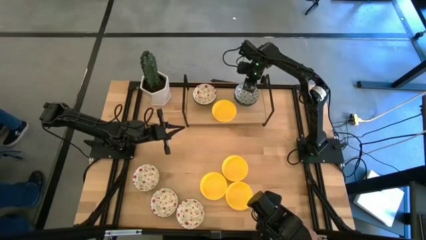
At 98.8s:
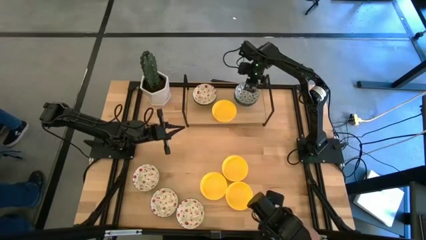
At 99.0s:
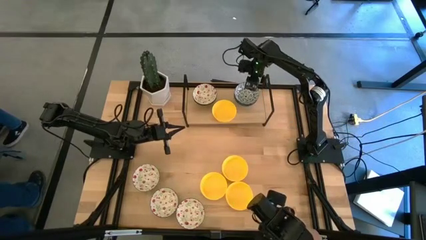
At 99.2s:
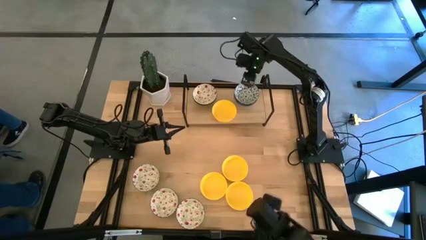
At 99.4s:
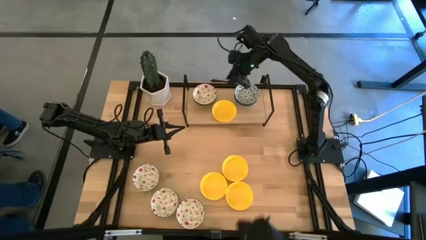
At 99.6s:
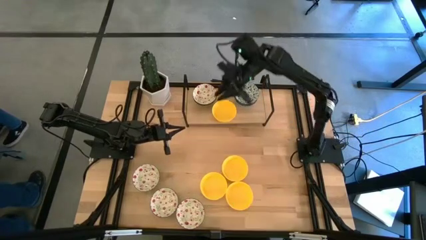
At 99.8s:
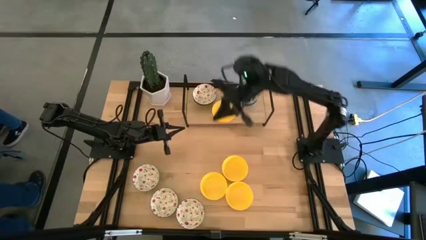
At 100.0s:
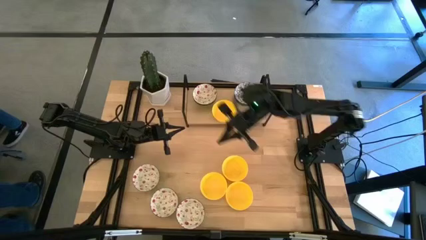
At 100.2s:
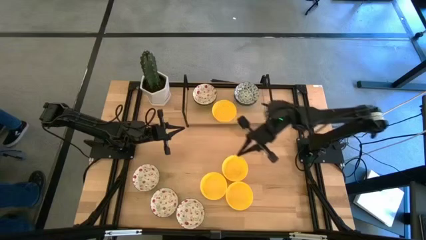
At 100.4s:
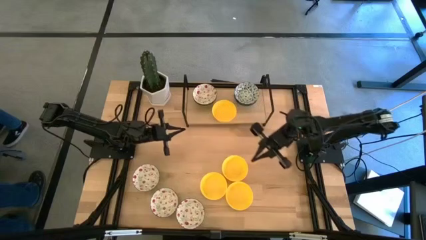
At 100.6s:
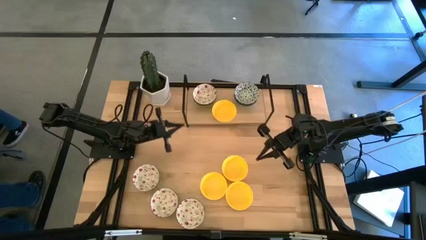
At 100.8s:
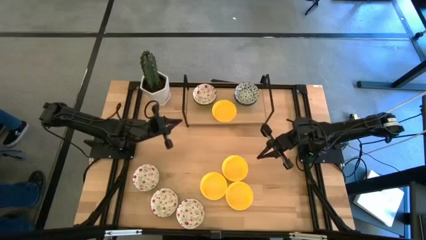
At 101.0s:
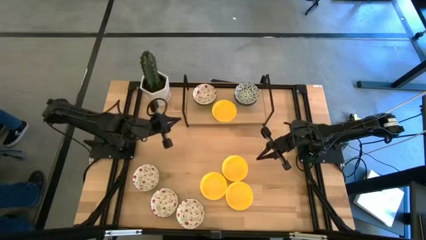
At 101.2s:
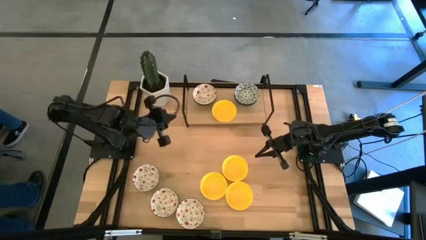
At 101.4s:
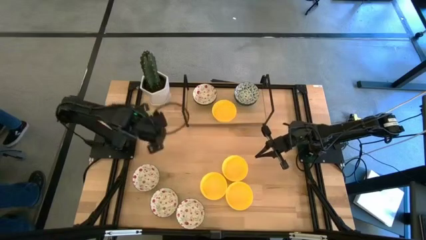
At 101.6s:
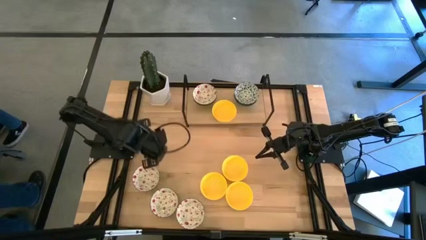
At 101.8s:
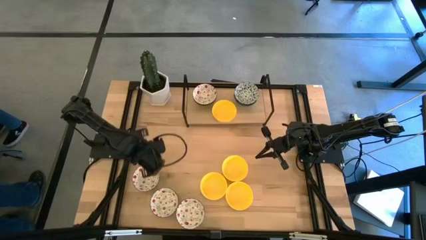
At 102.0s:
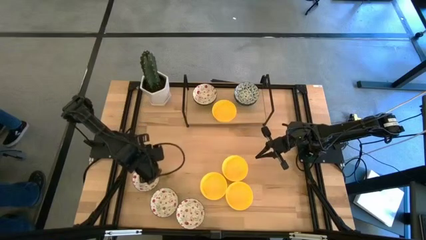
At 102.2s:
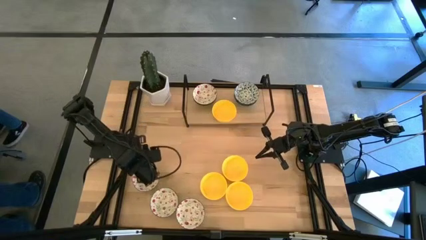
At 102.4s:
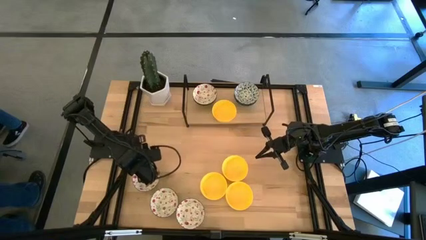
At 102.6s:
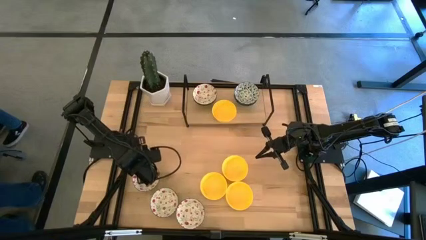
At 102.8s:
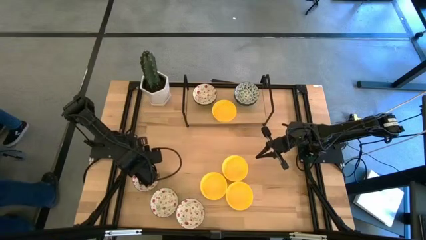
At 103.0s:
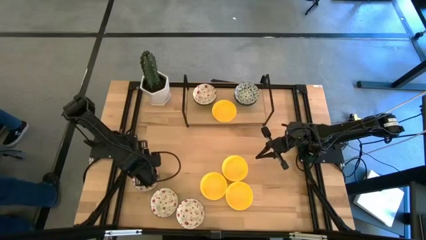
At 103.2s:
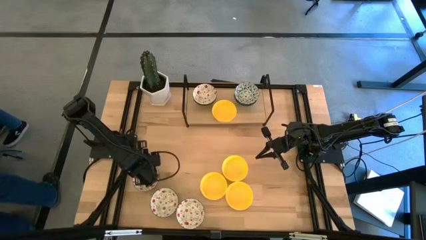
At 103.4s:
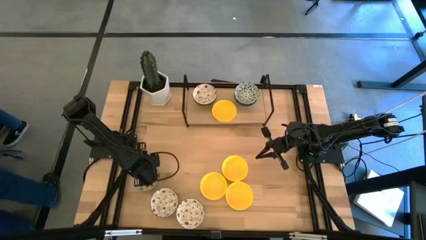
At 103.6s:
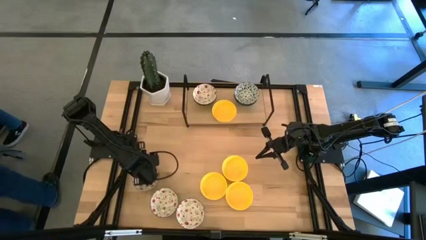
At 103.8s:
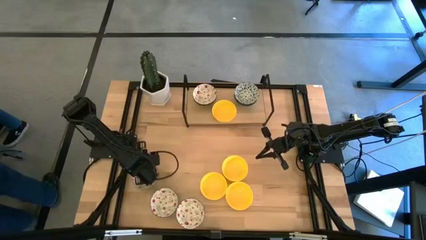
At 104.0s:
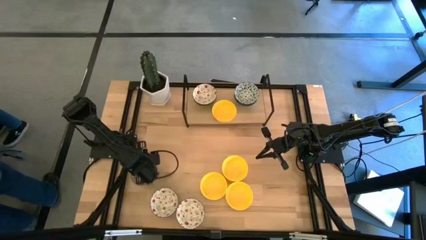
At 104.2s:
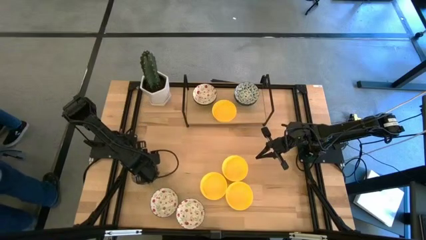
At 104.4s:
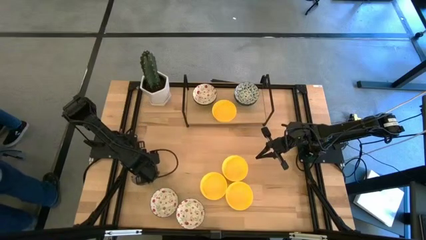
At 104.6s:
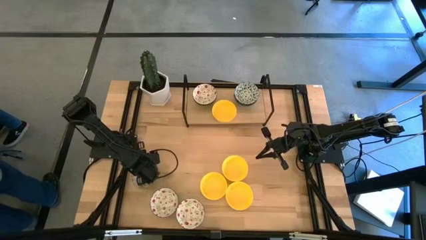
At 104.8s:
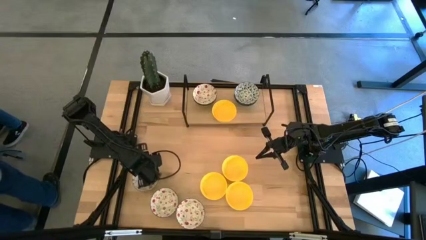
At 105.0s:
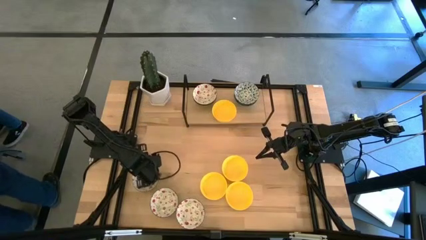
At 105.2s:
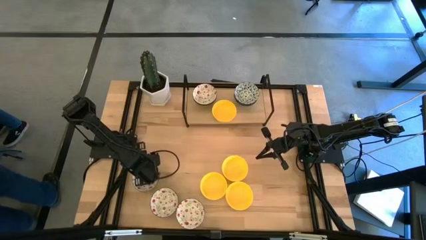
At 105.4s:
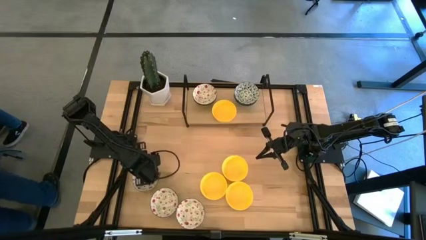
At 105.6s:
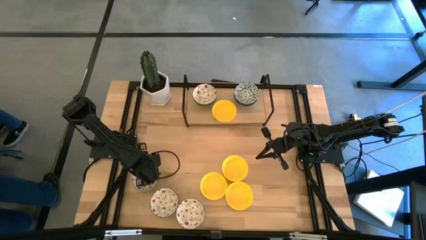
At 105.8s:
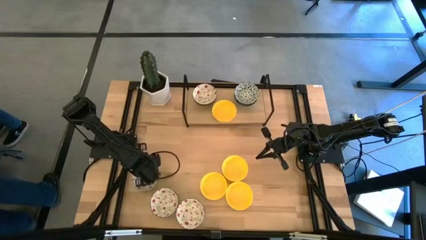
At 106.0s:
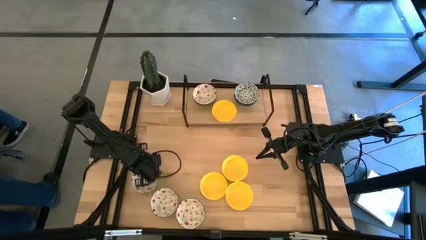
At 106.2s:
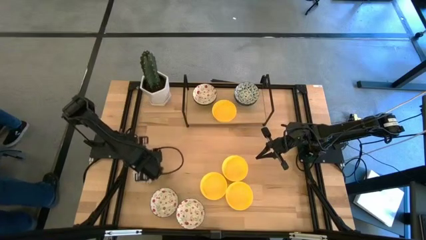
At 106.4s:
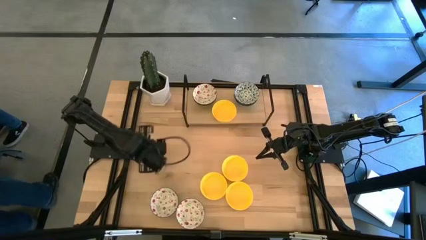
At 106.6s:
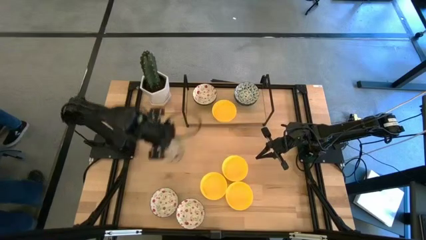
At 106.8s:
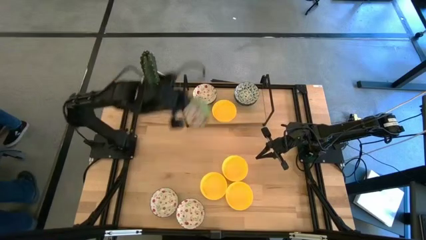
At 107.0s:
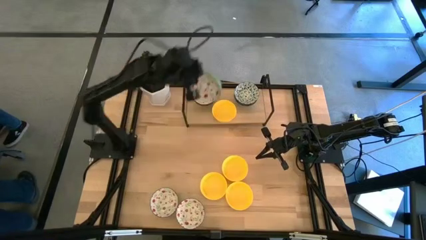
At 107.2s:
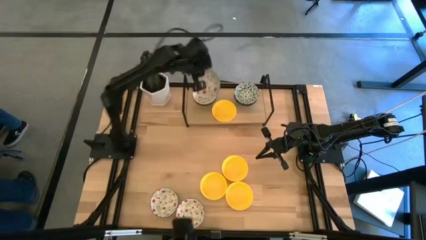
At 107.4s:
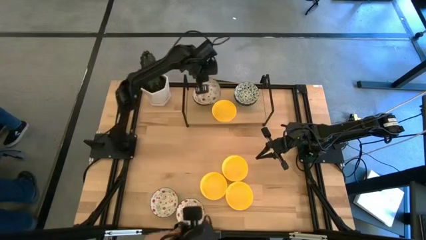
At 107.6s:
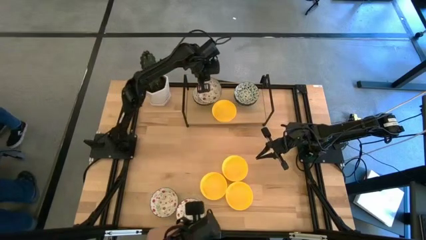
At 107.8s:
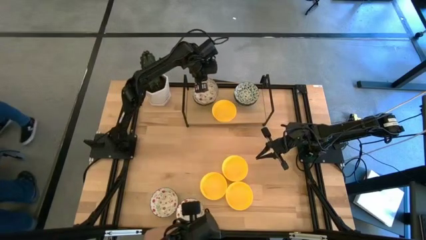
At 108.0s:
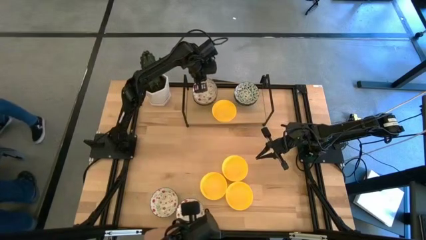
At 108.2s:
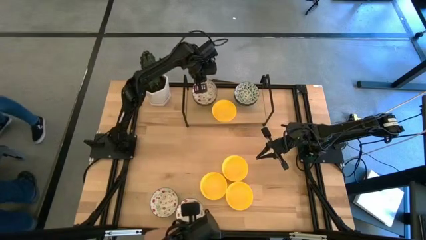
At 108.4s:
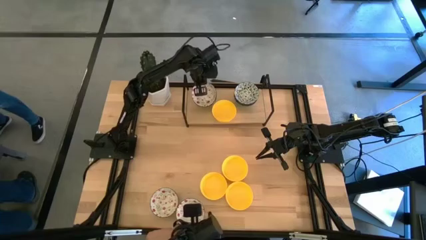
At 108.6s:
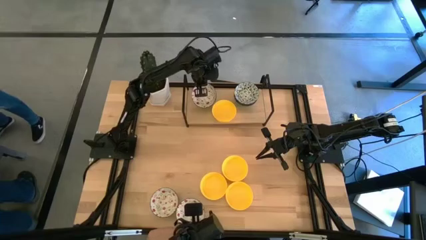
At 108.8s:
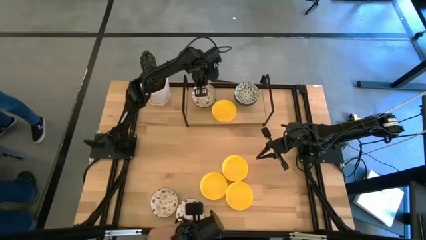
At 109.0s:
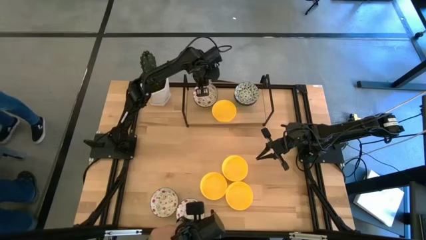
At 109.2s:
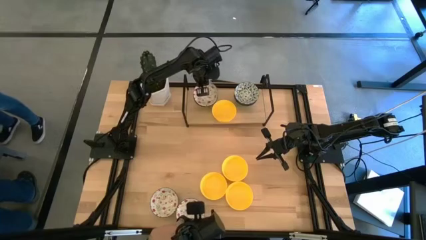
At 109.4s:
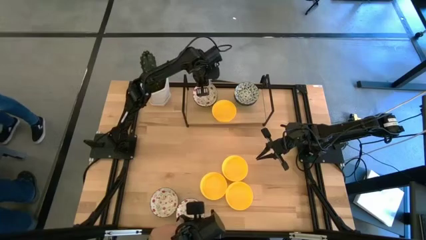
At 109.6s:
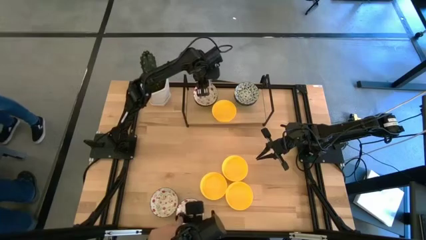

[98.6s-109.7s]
Task: Pick & Place Mini bowls
Stack the left green bowl on top of the green bowls on the shelf

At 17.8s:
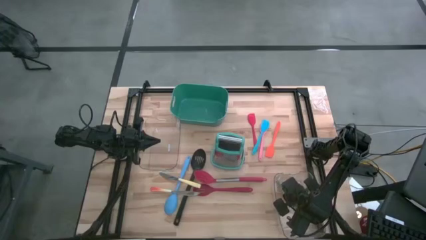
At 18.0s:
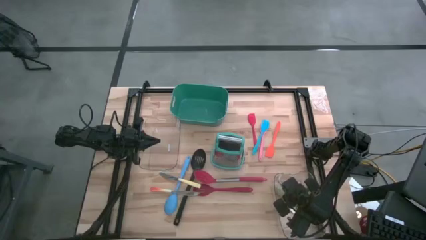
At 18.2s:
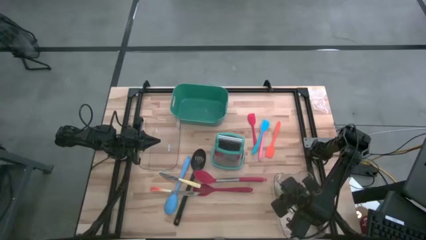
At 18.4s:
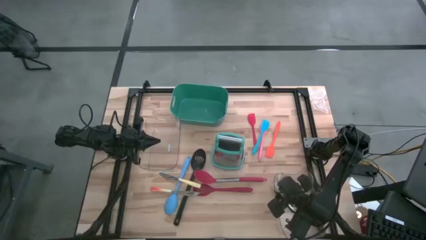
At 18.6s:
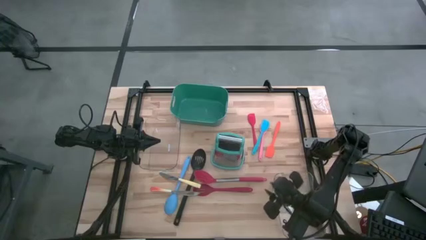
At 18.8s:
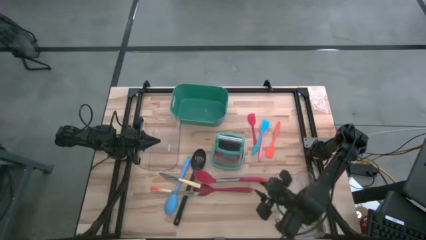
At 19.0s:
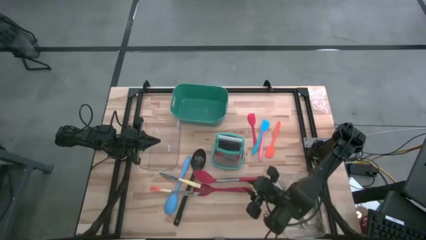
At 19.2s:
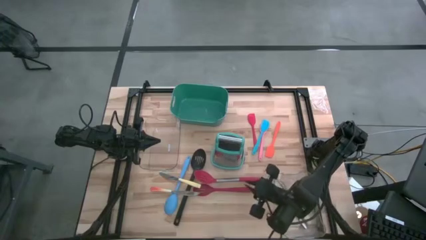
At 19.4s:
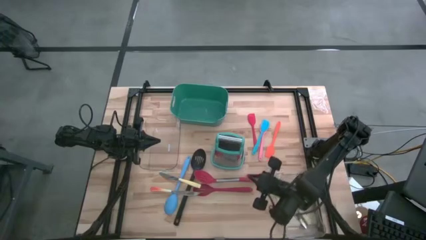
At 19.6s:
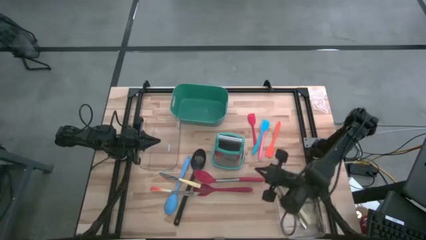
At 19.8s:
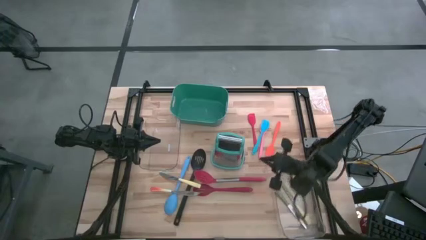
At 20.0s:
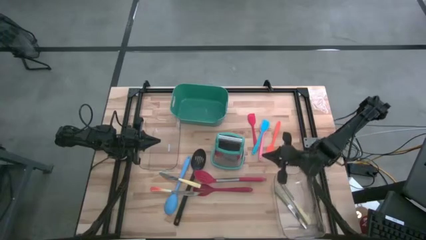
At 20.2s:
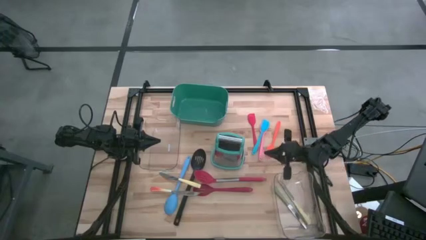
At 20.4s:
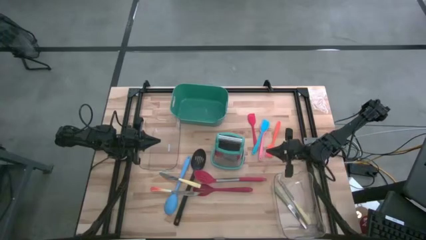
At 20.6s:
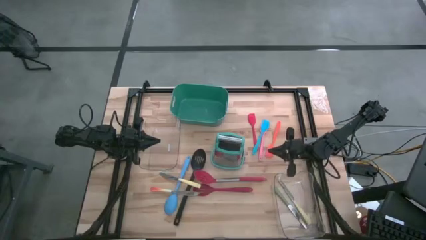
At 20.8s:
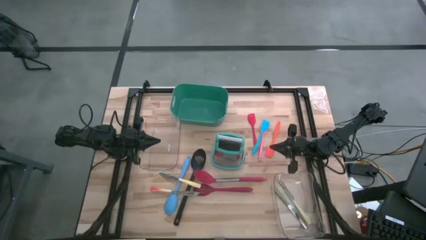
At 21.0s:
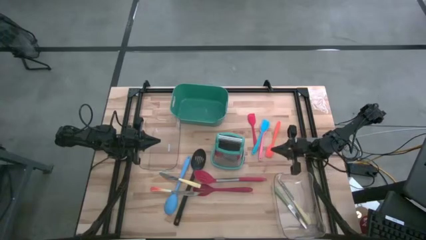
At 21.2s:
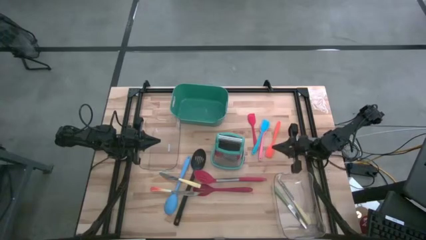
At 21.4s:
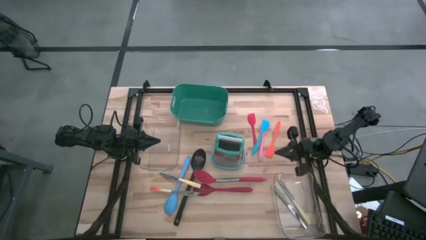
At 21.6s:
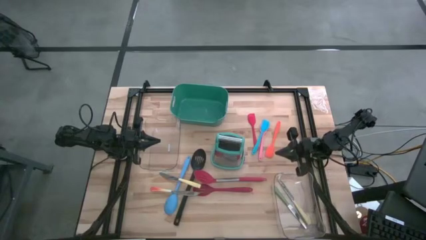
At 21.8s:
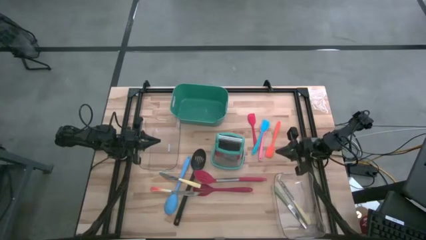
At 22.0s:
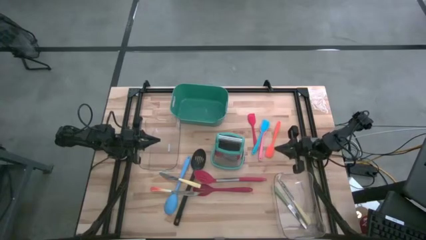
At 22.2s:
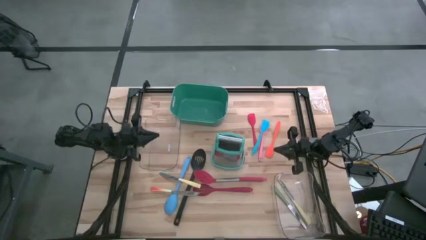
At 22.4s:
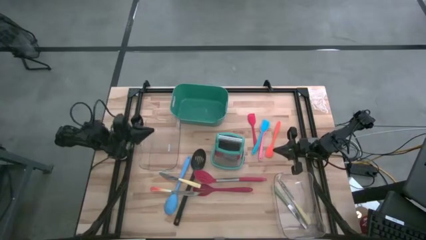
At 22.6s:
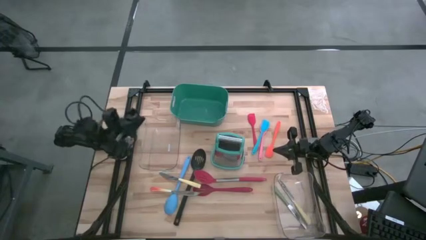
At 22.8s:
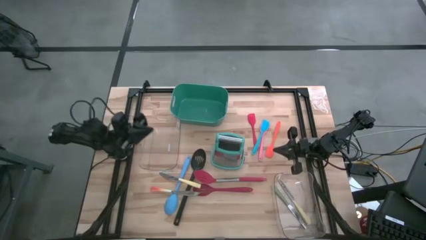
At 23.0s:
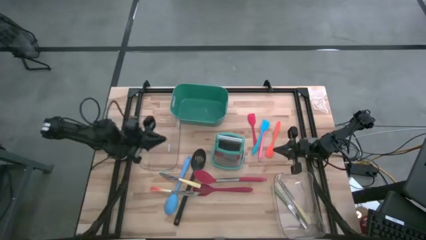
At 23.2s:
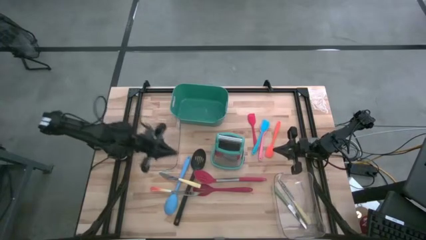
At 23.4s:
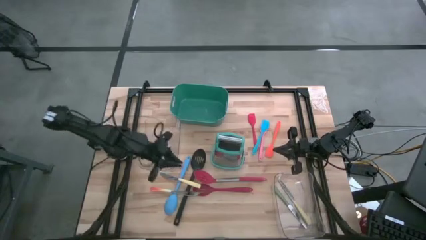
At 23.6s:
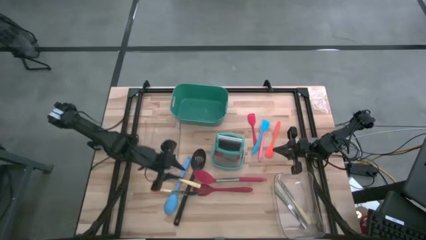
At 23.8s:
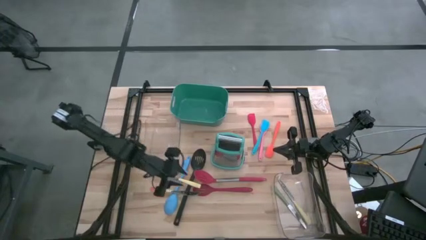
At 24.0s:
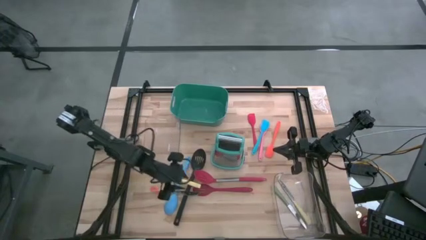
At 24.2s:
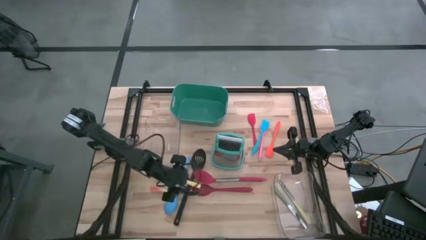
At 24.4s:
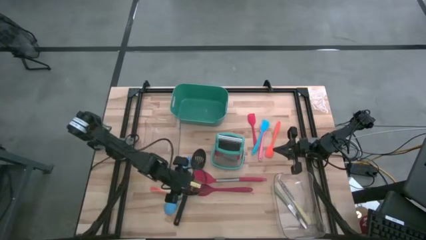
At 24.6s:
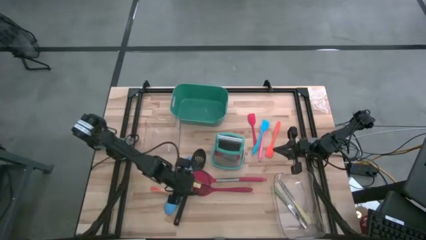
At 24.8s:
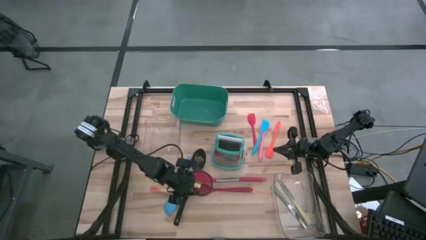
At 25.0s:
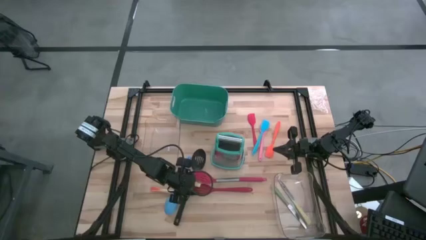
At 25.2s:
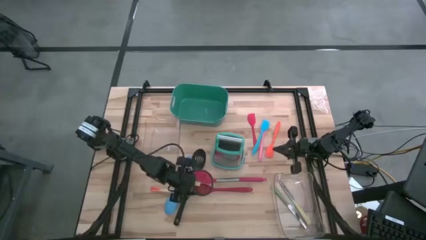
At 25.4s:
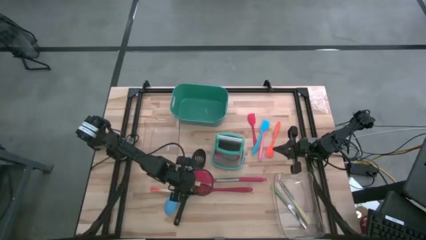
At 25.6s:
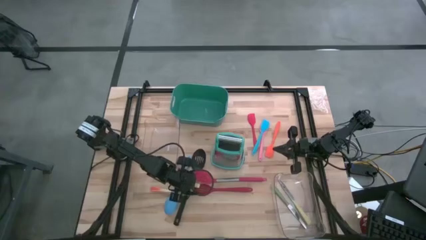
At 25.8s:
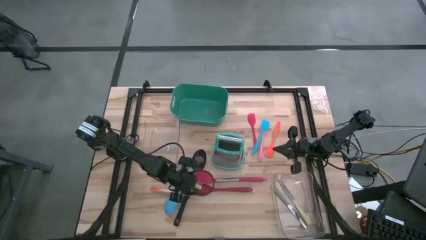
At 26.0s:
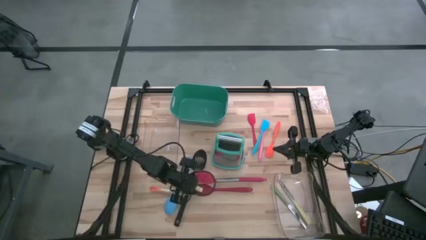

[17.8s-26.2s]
Task: Pick & Place Kitchen Items
Put the yellow table knife into the bottom transparent bin
